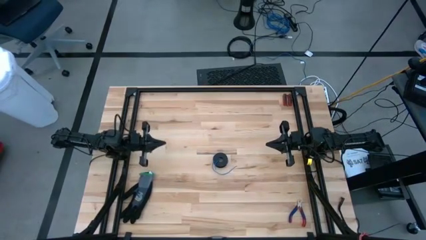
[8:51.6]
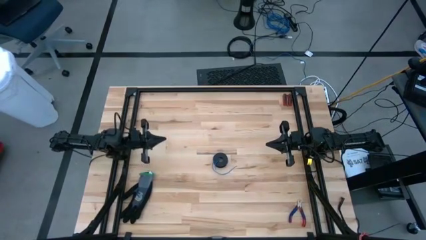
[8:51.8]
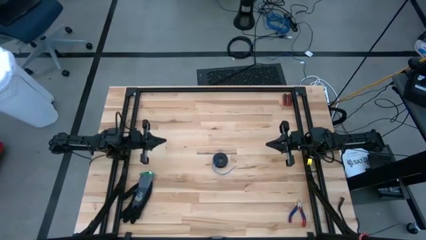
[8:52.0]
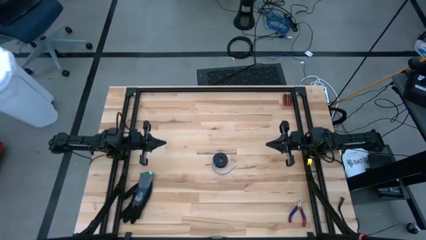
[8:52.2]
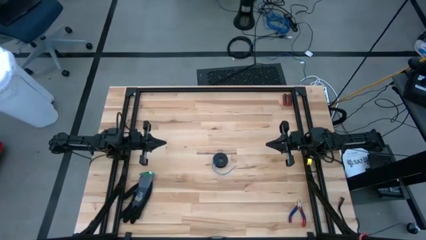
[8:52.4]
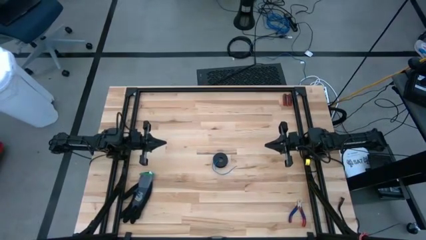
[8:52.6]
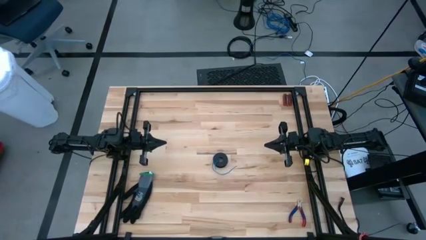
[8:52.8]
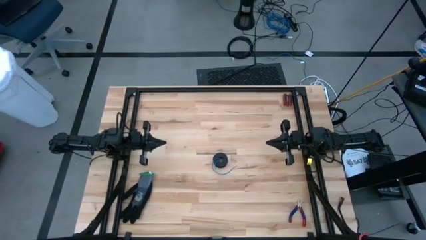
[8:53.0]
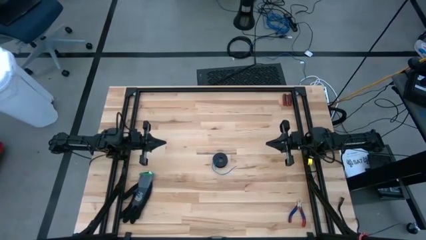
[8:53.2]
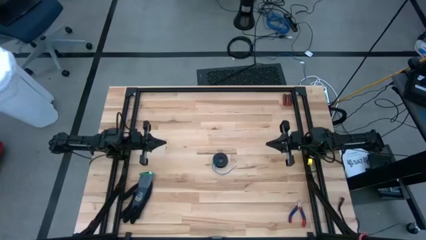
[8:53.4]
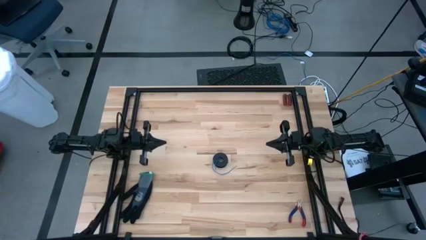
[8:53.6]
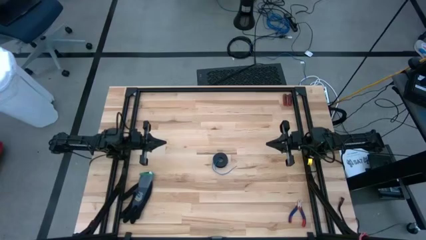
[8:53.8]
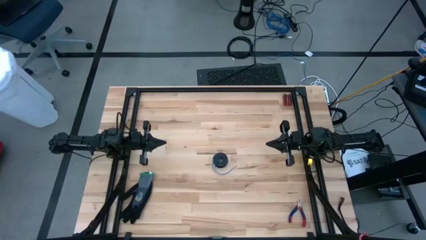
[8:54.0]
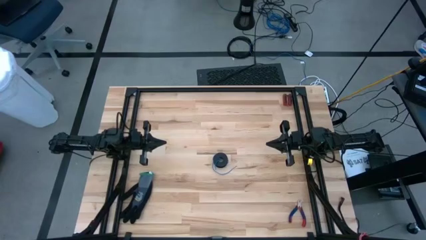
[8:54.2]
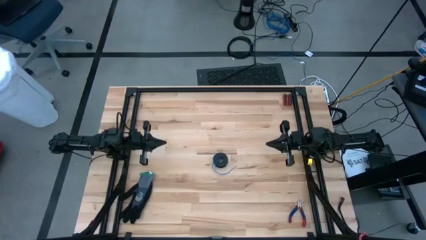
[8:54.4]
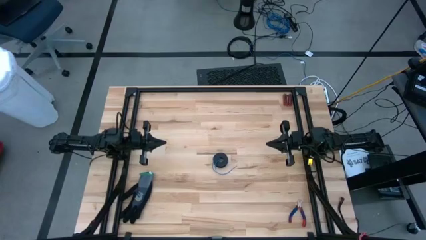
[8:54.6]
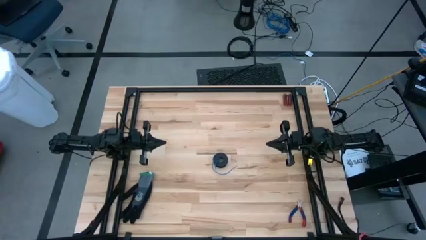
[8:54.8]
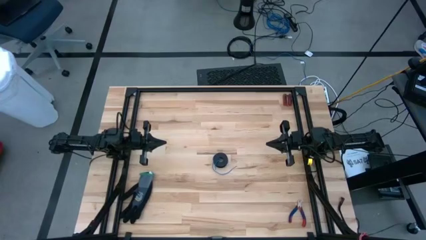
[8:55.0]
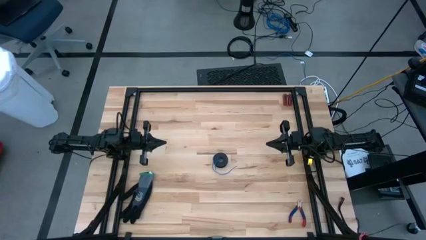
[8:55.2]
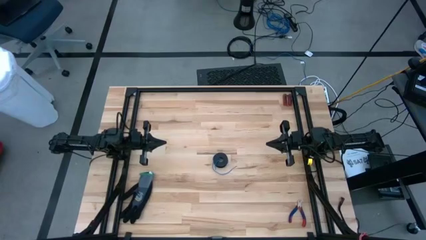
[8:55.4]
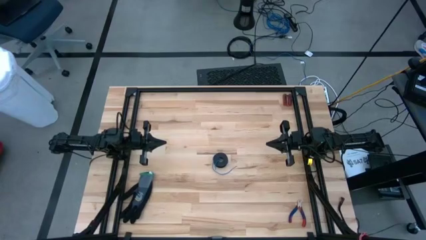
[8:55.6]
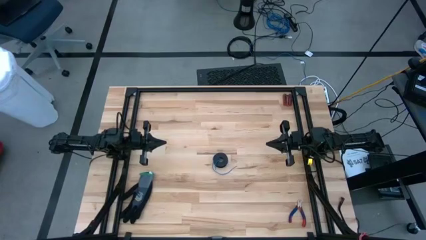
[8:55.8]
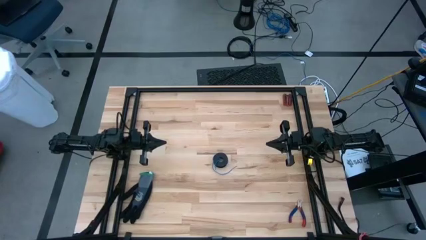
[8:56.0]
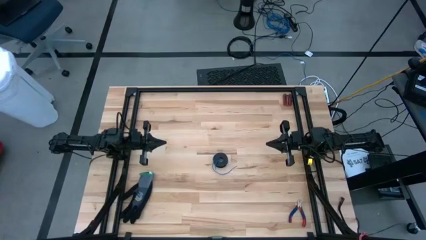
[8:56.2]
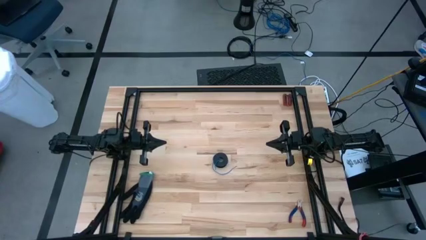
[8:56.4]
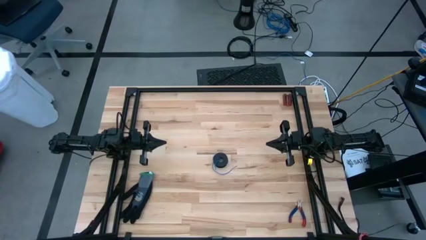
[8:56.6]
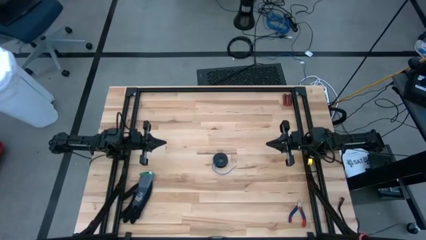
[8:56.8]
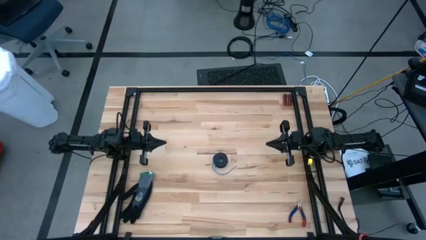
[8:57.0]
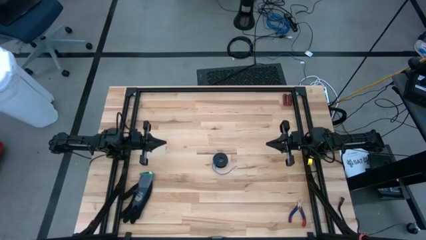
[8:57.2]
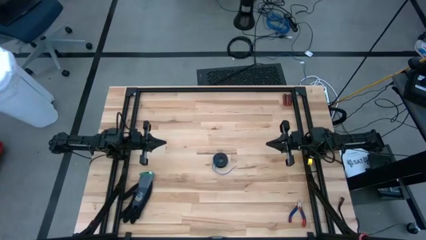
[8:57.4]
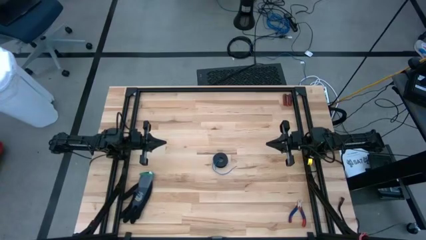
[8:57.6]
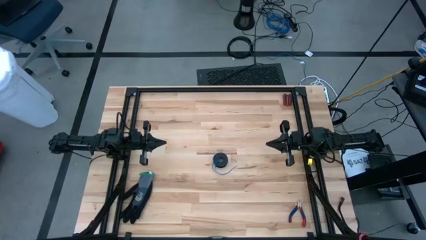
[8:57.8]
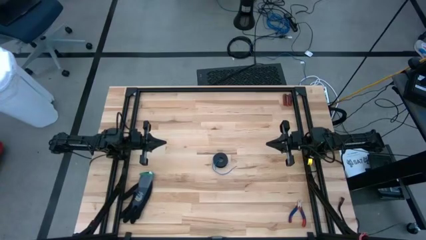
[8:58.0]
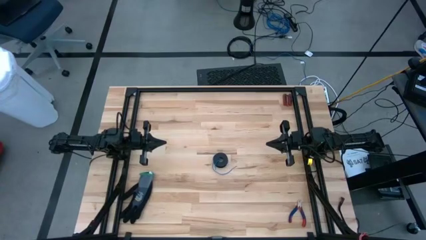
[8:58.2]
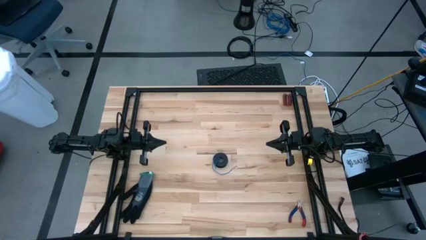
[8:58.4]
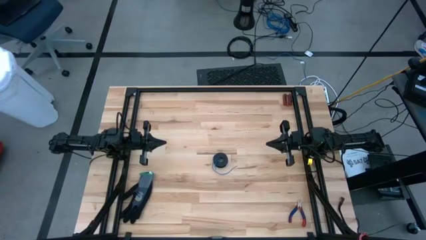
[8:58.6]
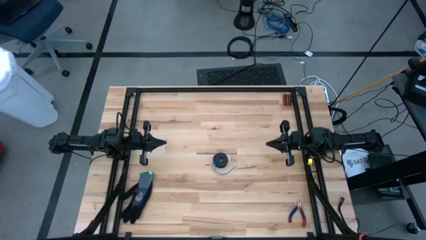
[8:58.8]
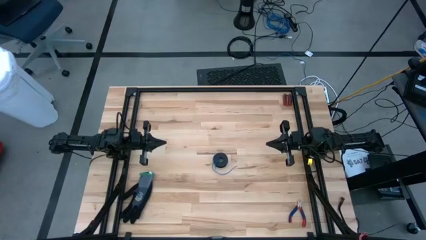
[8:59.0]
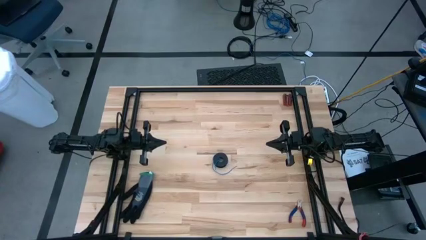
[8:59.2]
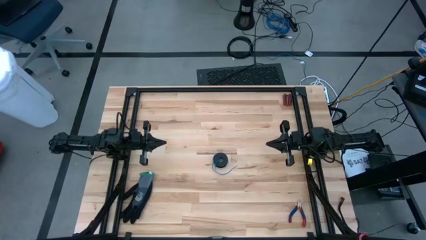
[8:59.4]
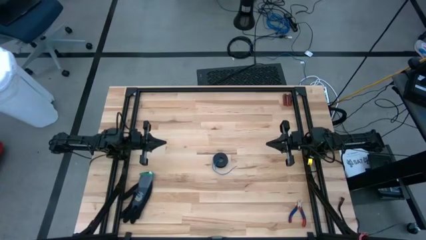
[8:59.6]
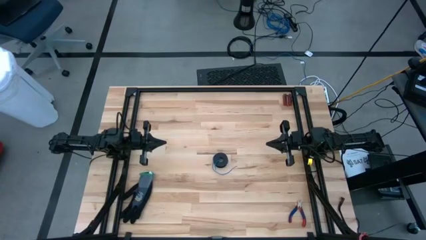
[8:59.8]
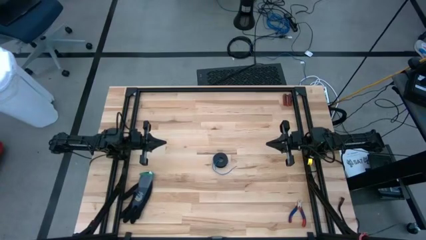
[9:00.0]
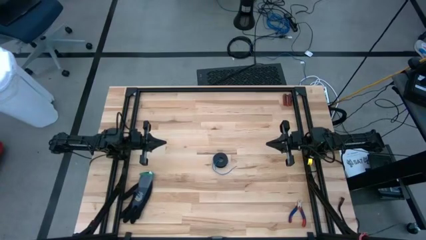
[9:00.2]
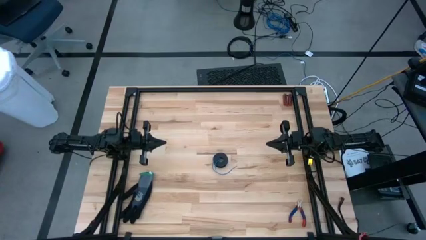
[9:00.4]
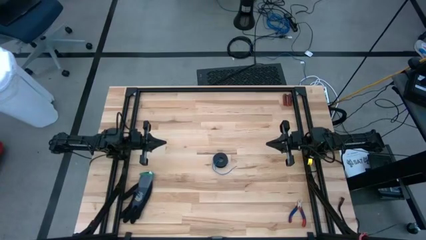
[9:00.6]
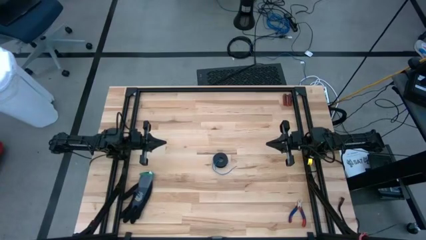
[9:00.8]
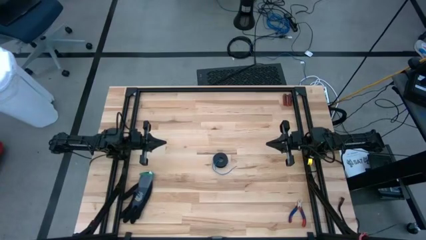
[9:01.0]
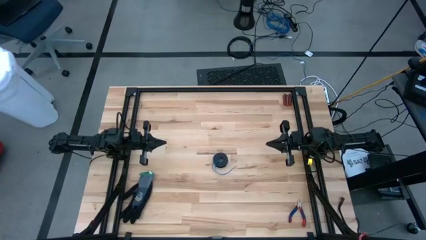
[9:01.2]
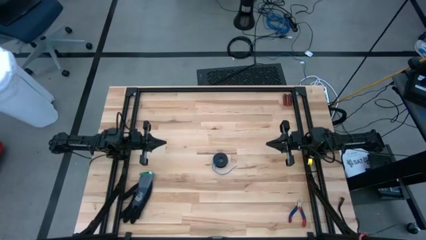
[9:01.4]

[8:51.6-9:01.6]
Task: Coil cords
Return to Home Position

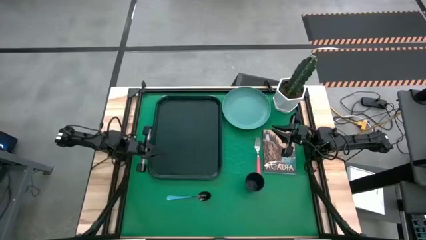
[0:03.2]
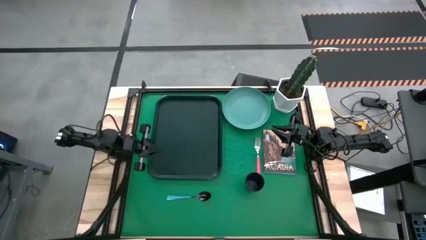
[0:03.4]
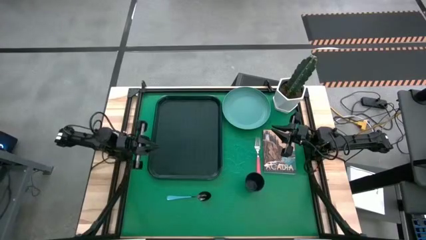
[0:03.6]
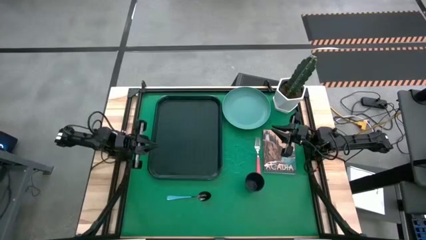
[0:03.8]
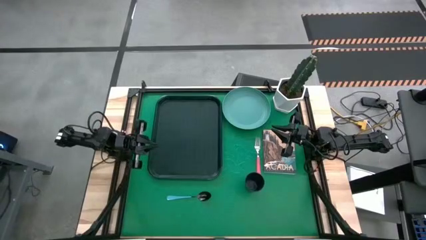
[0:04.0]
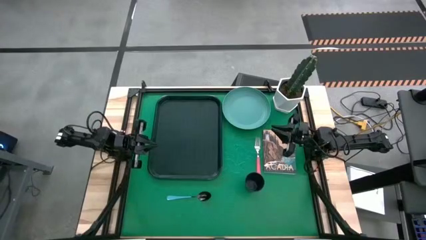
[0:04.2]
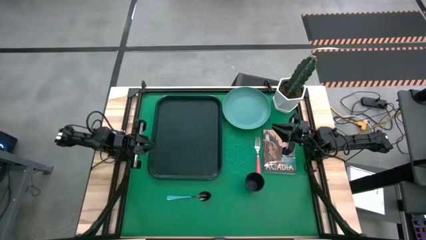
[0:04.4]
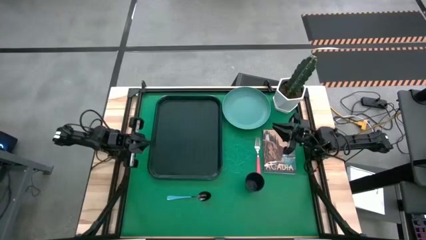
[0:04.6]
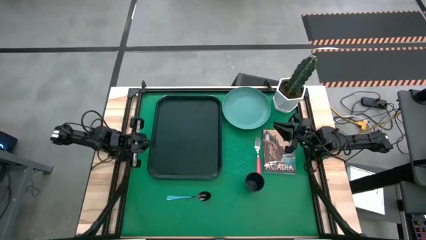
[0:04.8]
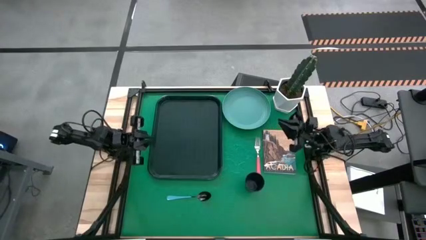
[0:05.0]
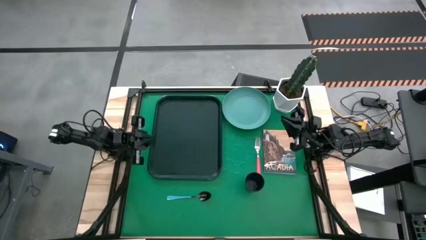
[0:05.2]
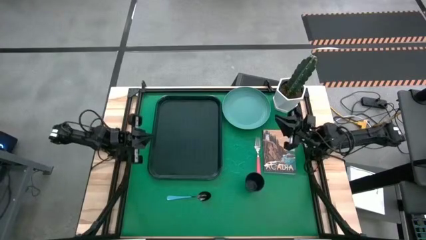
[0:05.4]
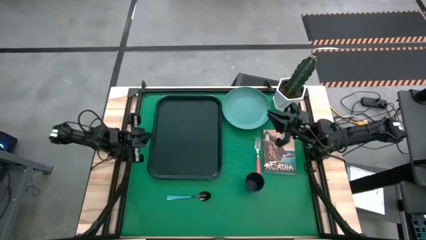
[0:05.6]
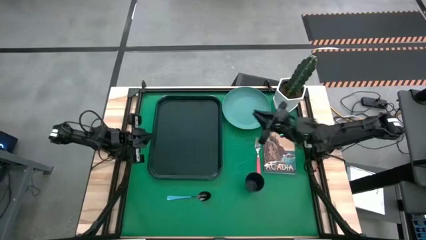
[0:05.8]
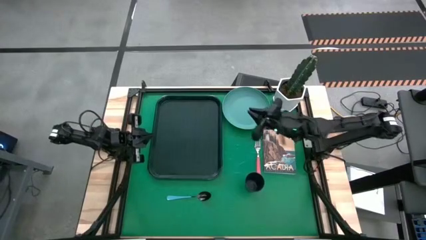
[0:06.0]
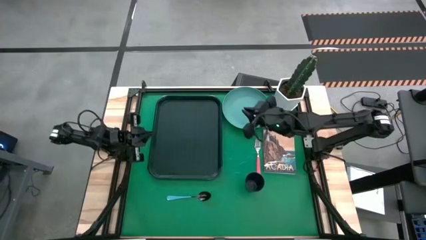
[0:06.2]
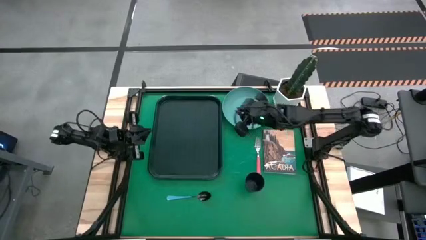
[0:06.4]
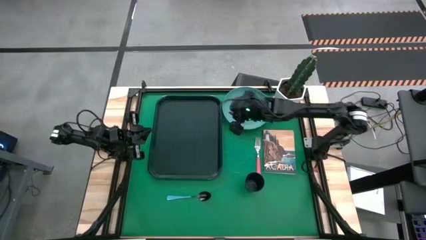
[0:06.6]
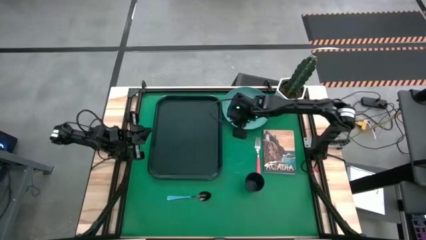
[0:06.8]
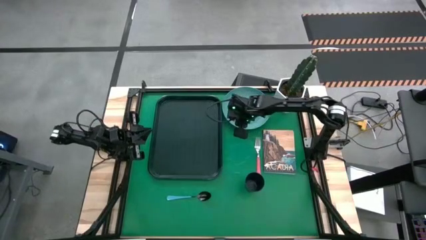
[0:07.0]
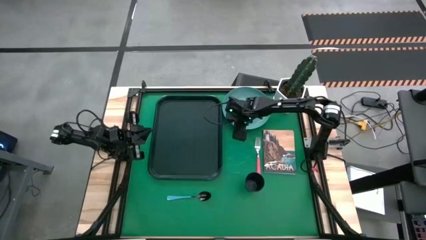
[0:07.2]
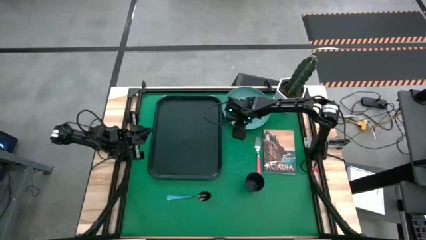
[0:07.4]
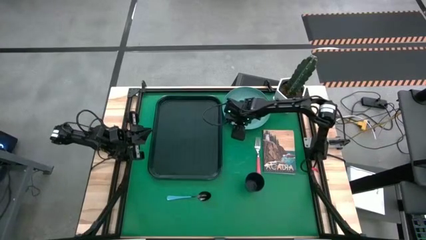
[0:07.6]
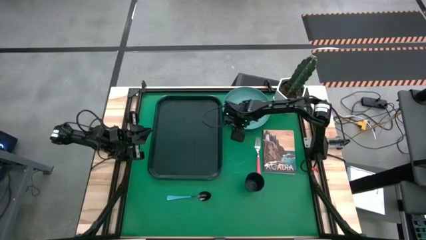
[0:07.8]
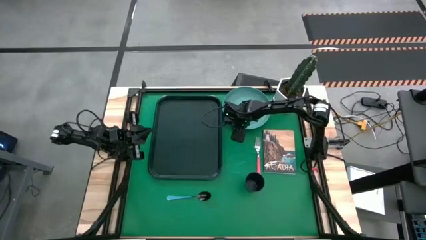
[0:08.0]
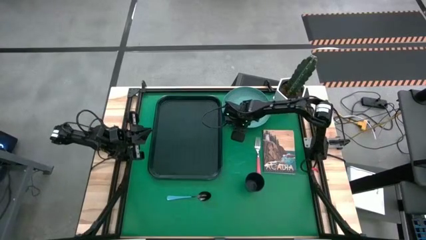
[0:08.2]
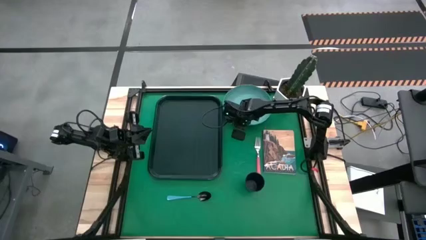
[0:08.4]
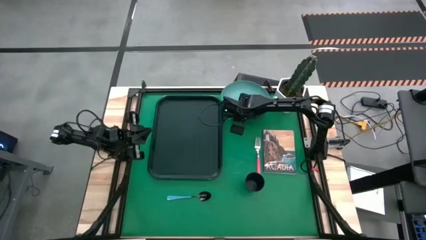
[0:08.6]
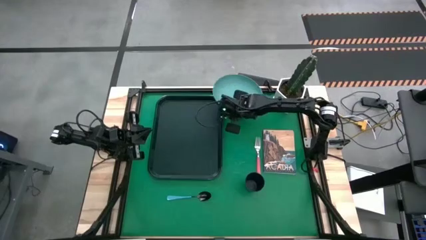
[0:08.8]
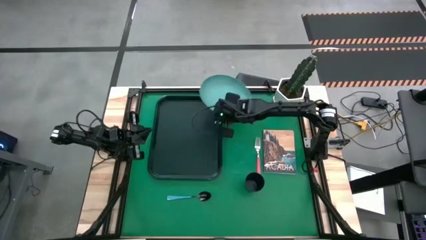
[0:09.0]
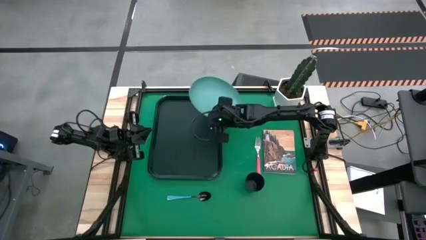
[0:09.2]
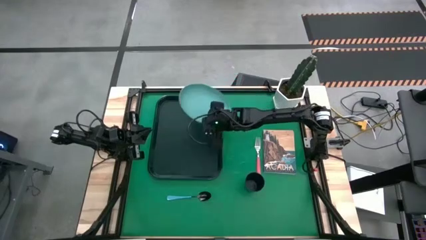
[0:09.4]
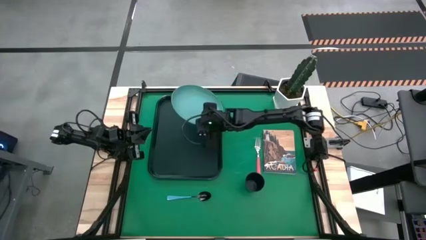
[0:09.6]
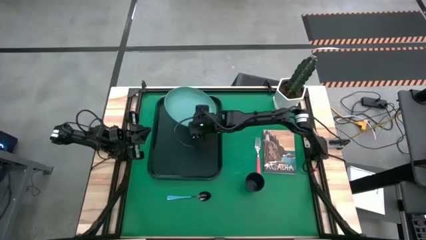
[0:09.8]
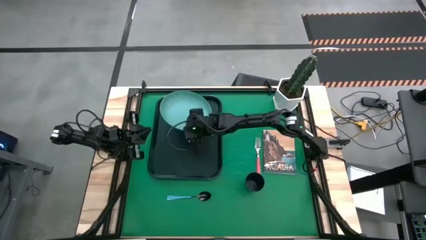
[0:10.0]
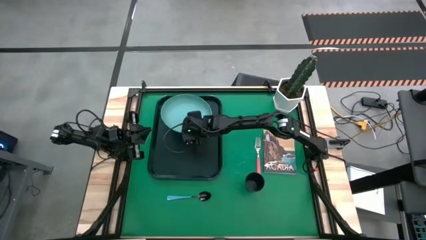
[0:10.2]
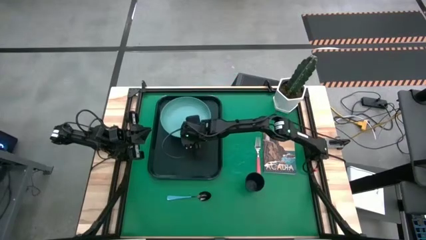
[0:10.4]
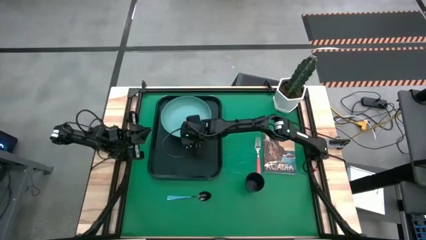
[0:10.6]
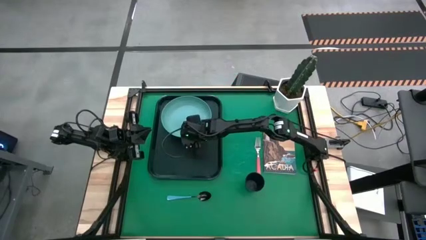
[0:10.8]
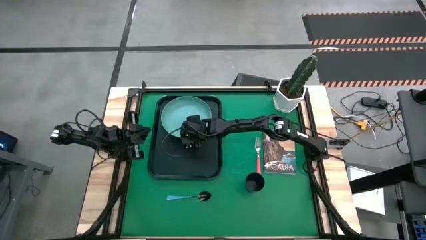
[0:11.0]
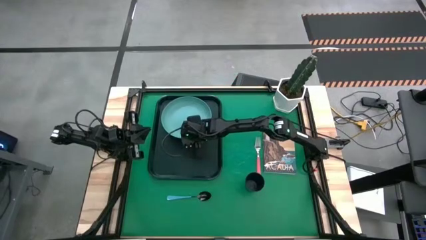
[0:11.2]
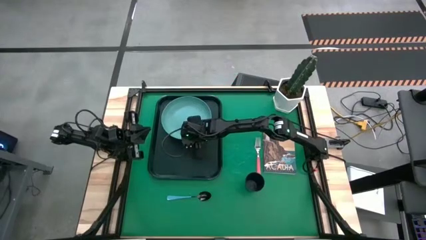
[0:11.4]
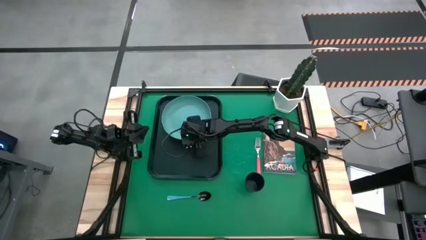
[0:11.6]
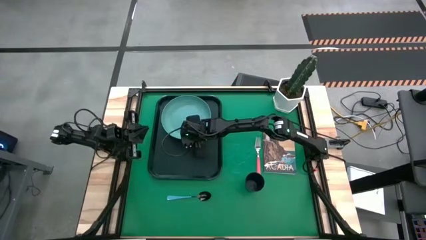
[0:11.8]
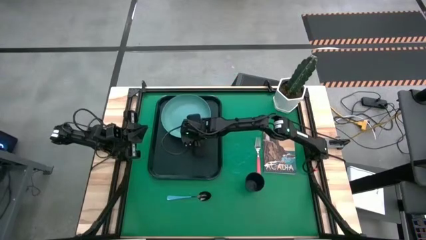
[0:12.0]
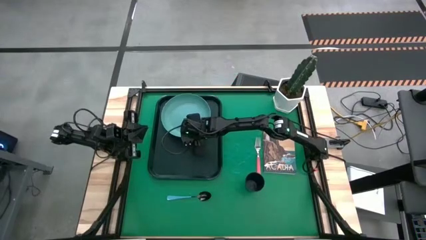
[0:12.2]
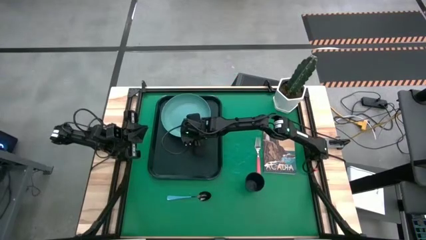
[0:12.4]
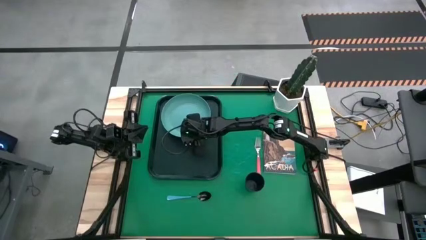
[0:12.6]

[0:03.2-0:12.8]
Task: Pick and place plate/cup/fork/spoon on tray
Put the green plate on the black serving tray
